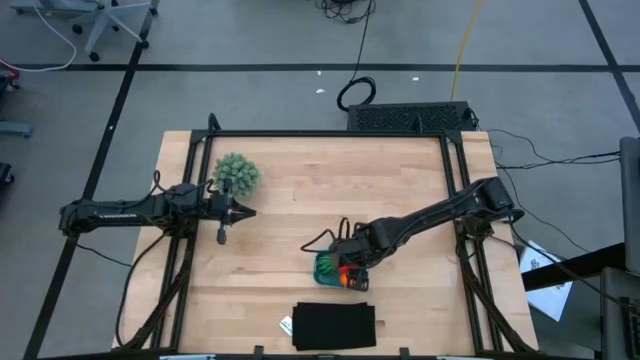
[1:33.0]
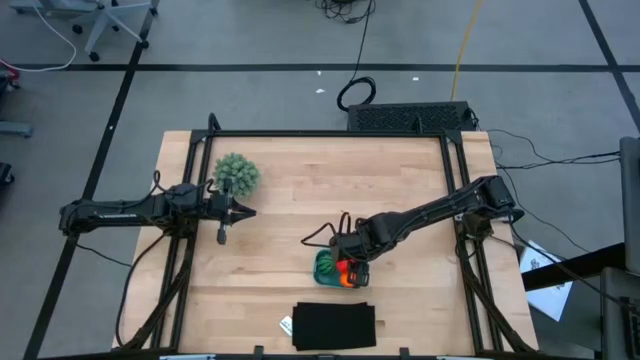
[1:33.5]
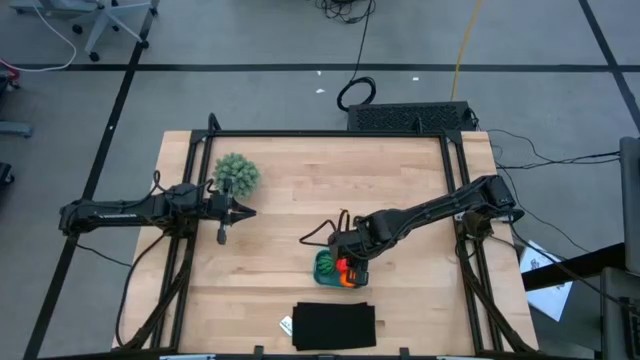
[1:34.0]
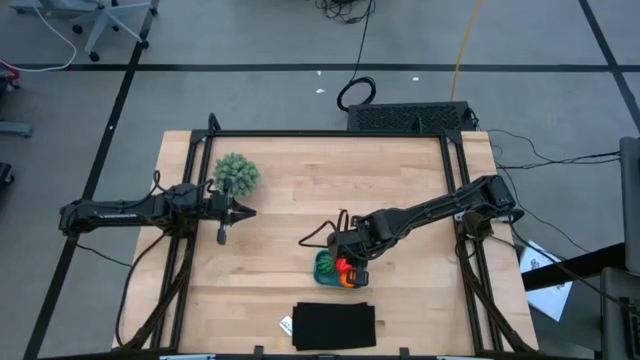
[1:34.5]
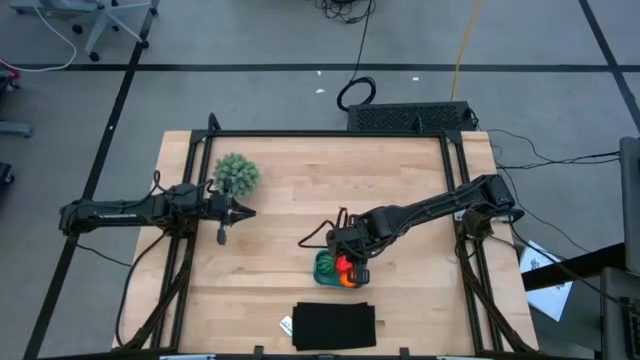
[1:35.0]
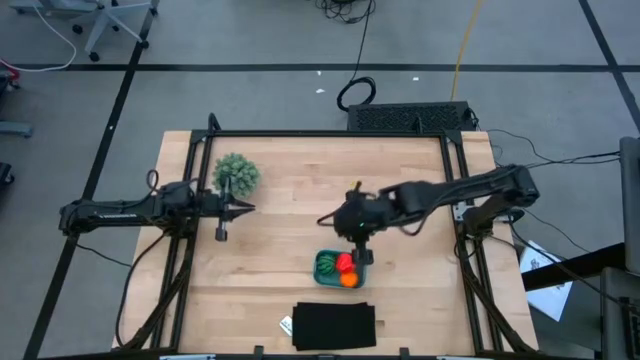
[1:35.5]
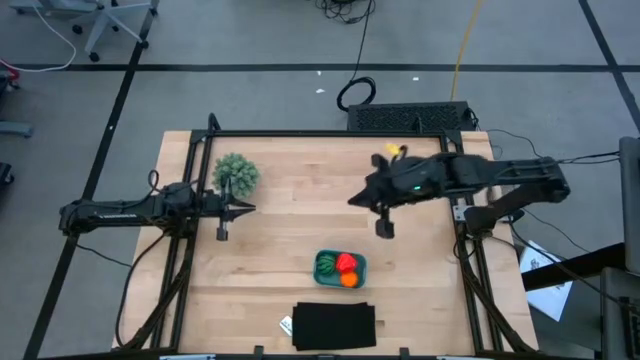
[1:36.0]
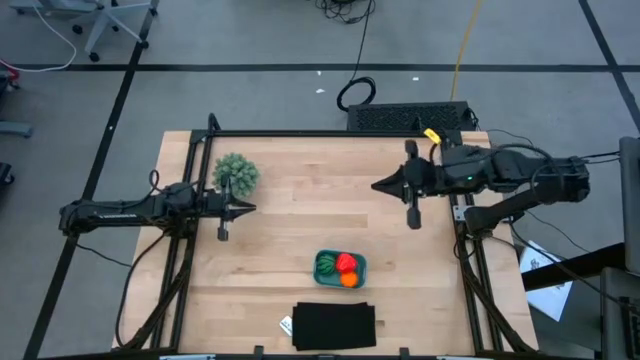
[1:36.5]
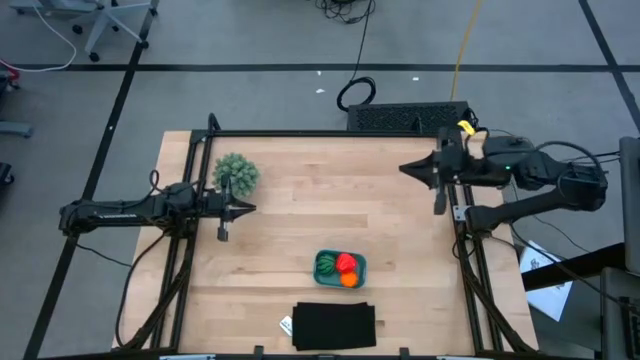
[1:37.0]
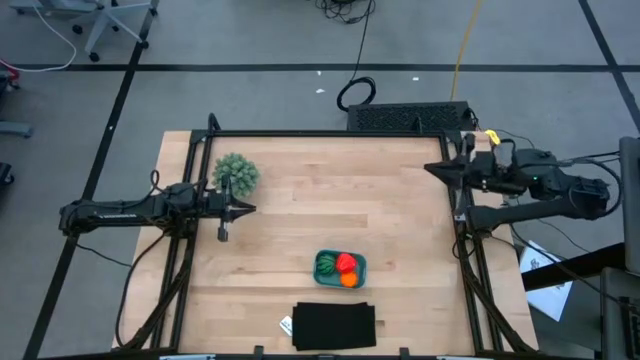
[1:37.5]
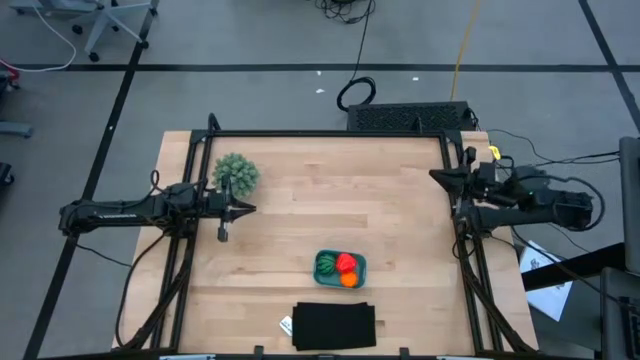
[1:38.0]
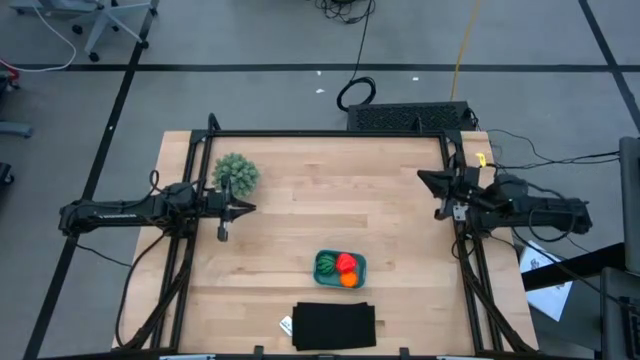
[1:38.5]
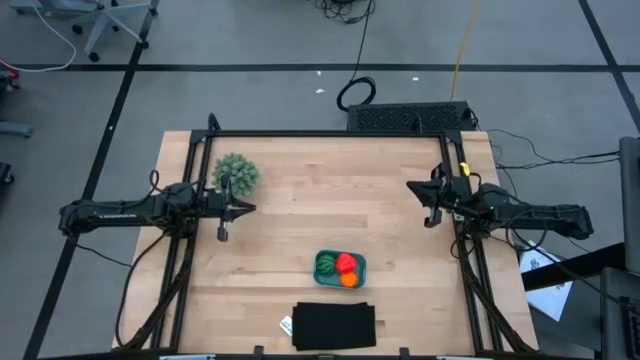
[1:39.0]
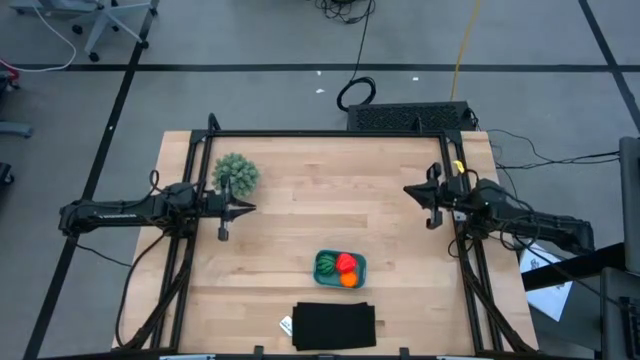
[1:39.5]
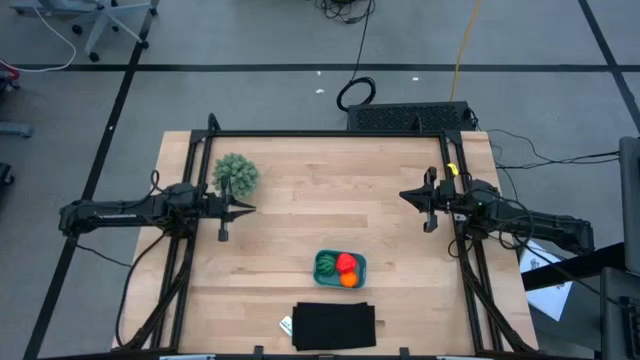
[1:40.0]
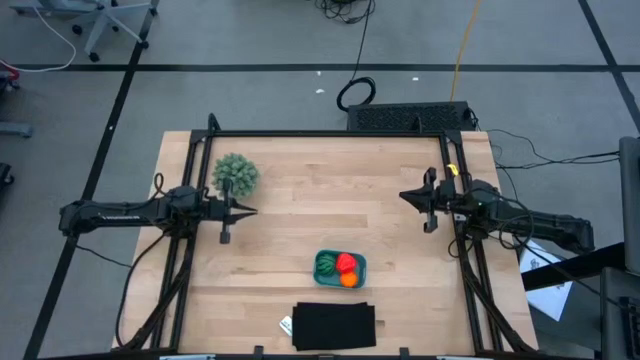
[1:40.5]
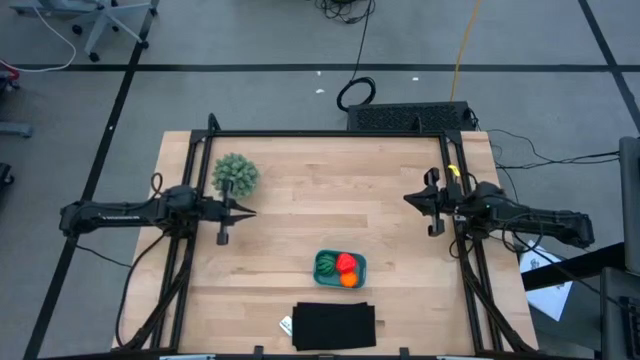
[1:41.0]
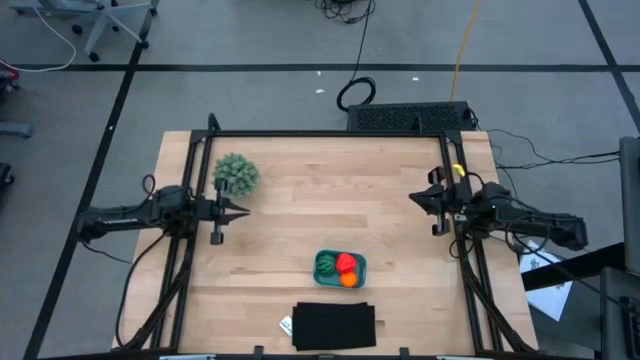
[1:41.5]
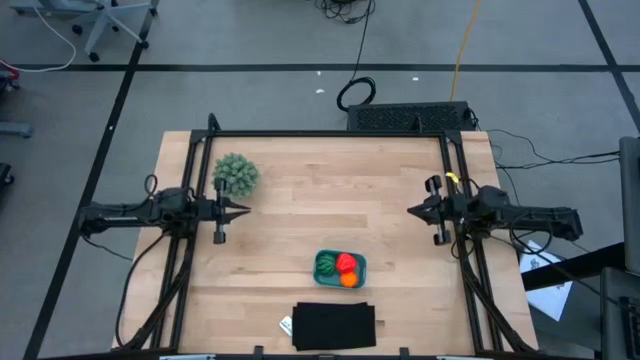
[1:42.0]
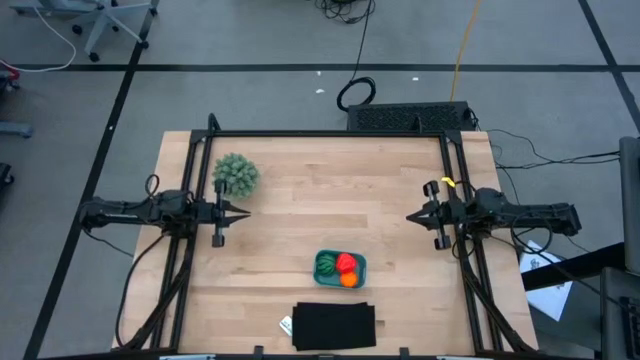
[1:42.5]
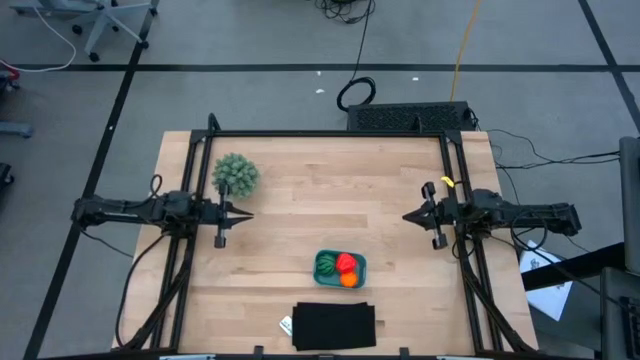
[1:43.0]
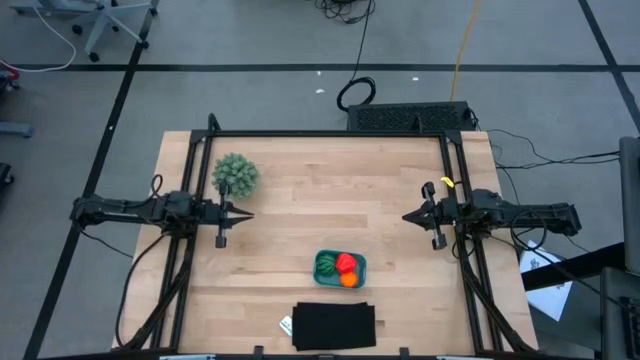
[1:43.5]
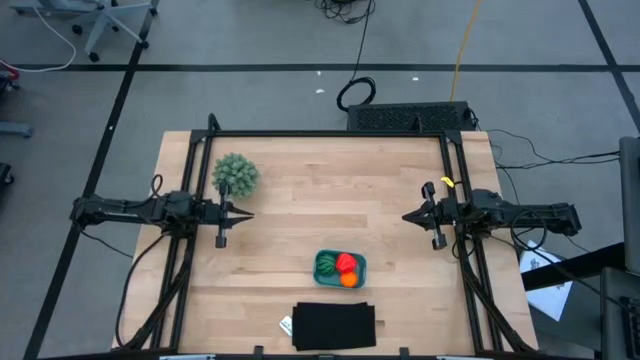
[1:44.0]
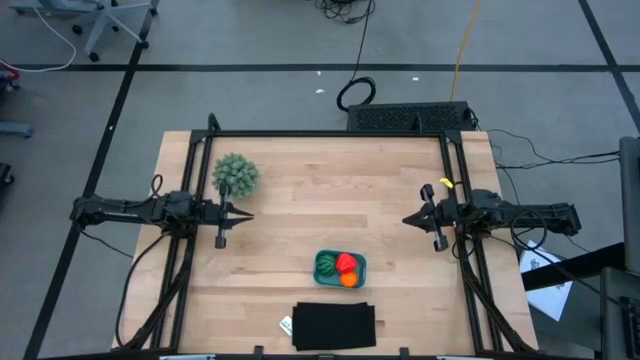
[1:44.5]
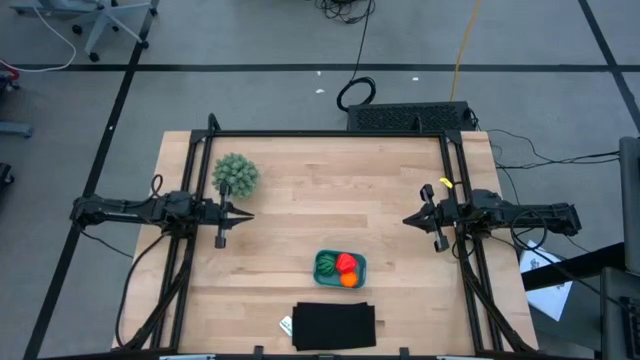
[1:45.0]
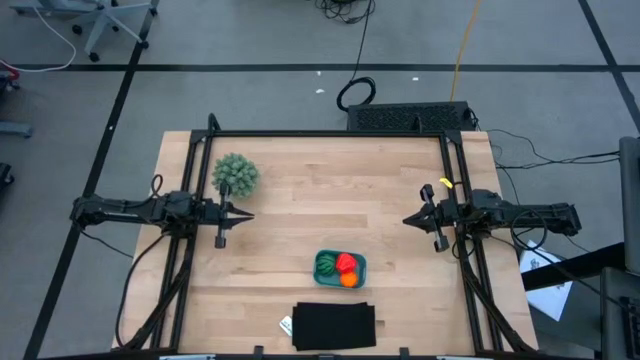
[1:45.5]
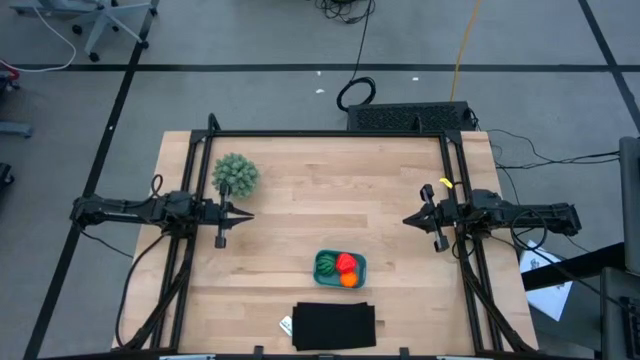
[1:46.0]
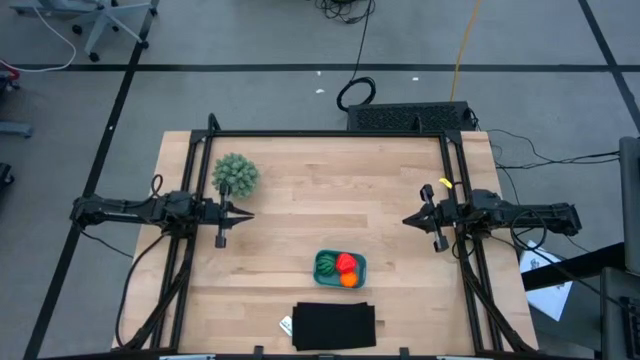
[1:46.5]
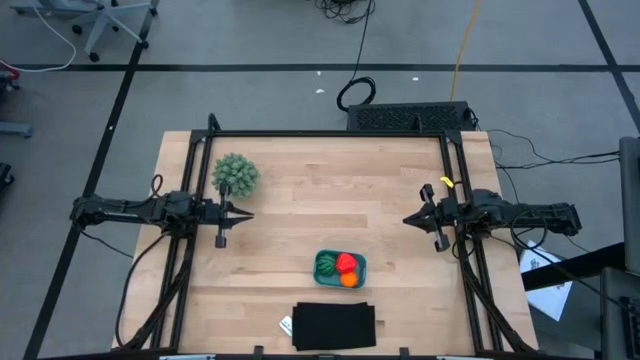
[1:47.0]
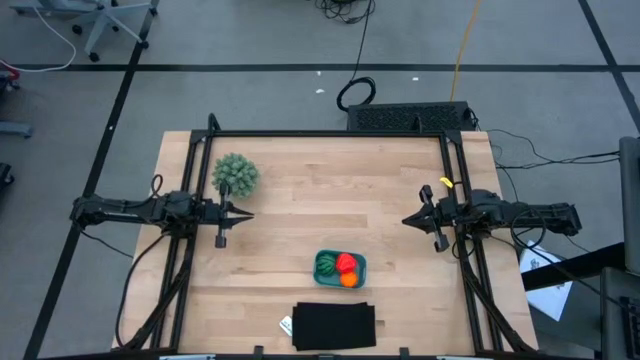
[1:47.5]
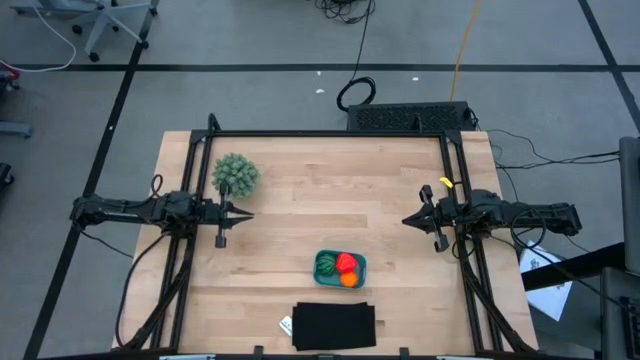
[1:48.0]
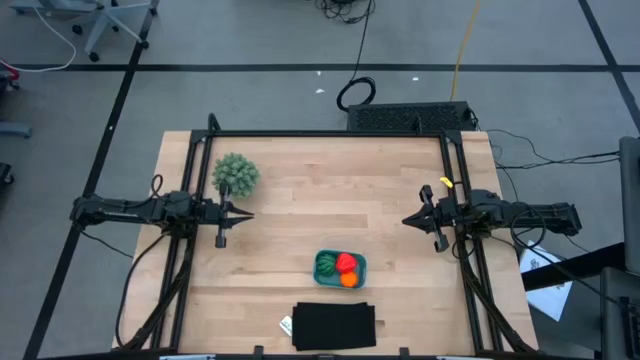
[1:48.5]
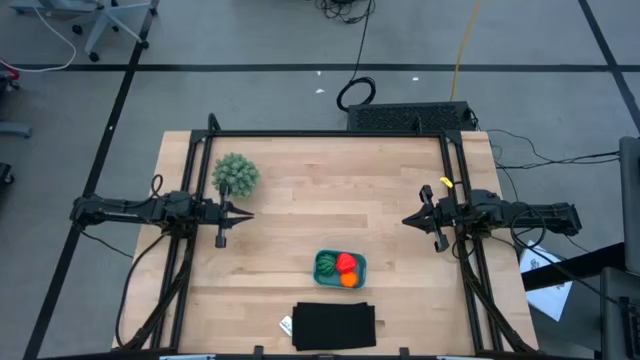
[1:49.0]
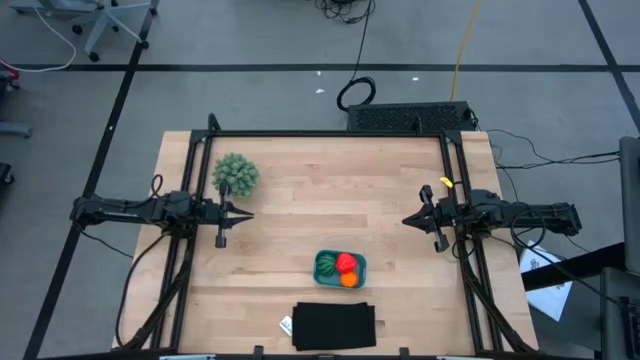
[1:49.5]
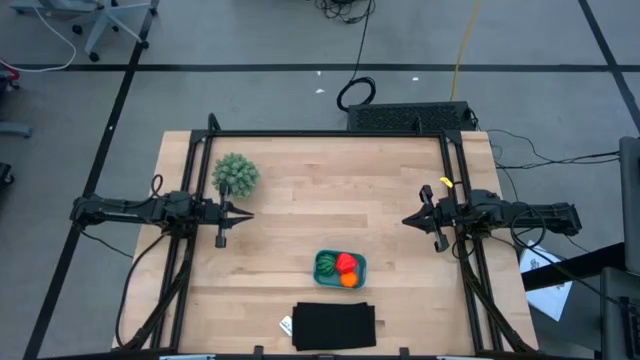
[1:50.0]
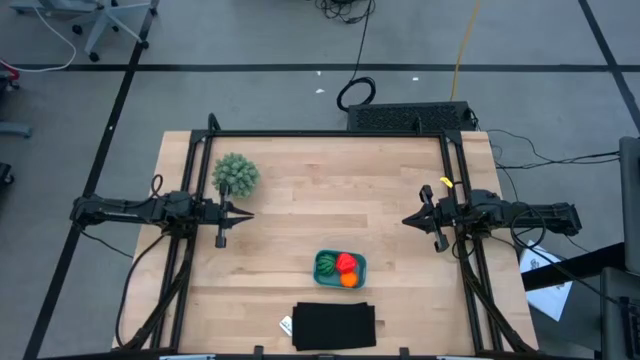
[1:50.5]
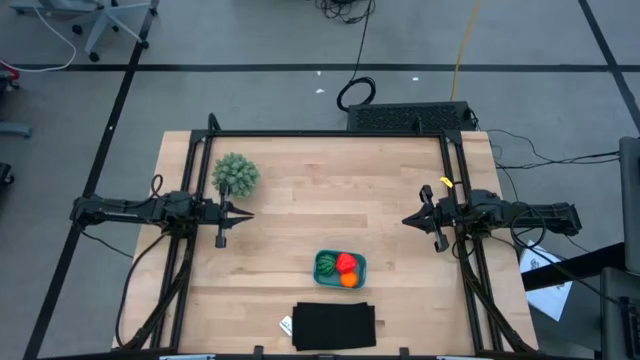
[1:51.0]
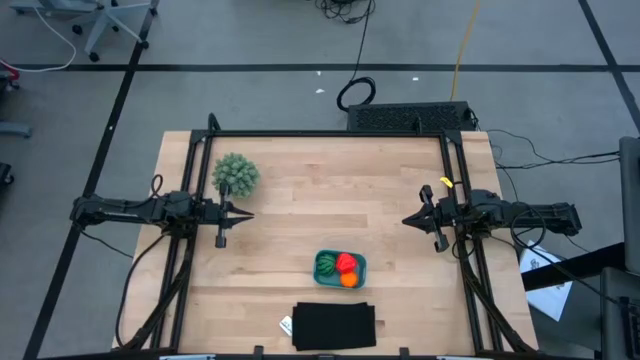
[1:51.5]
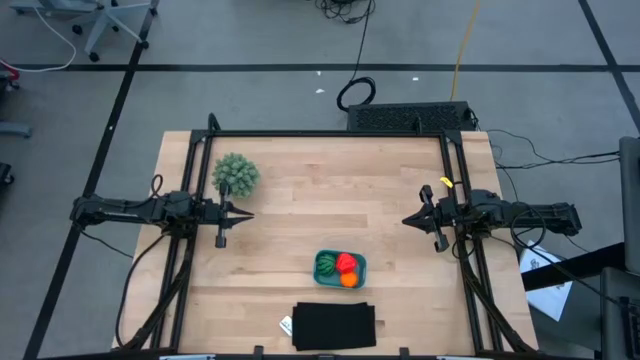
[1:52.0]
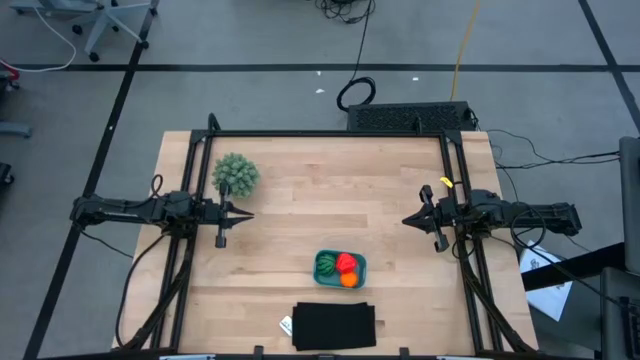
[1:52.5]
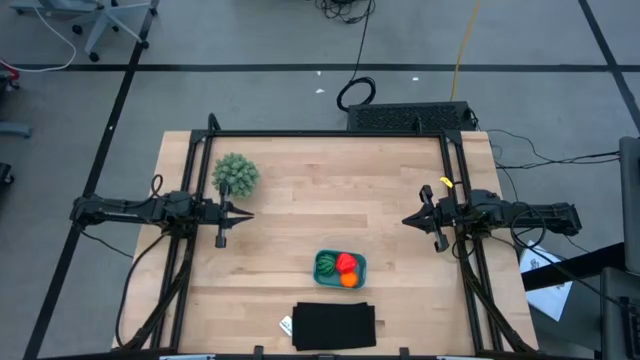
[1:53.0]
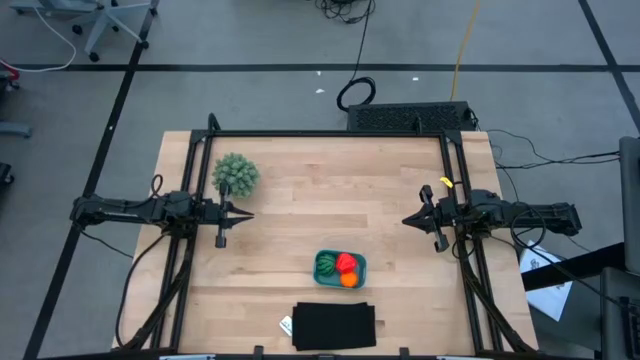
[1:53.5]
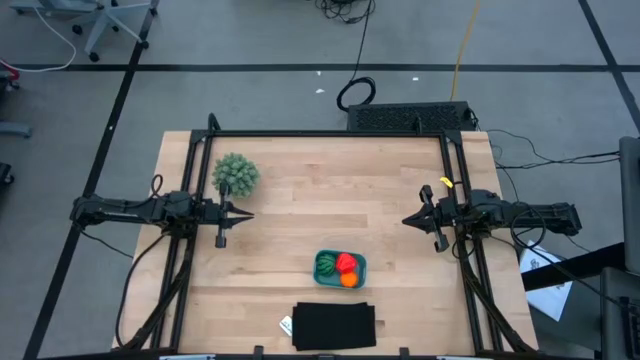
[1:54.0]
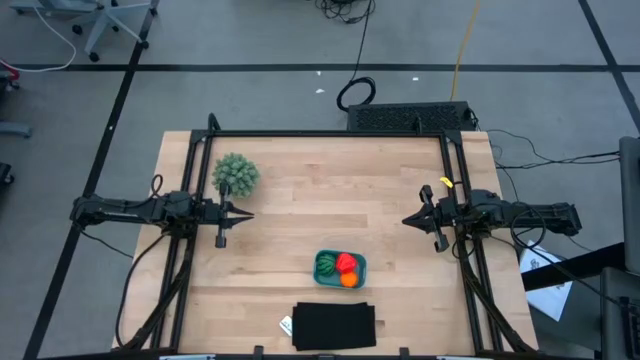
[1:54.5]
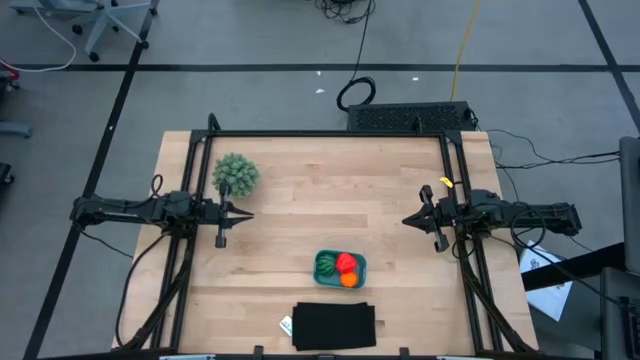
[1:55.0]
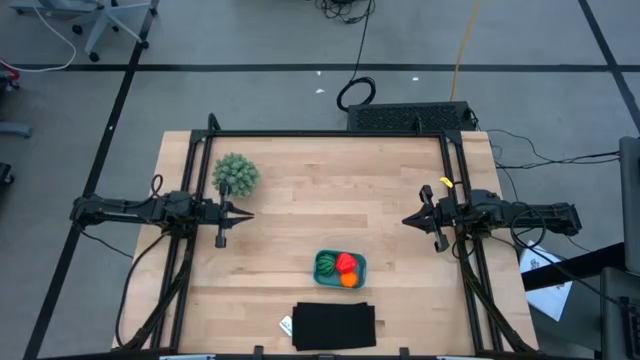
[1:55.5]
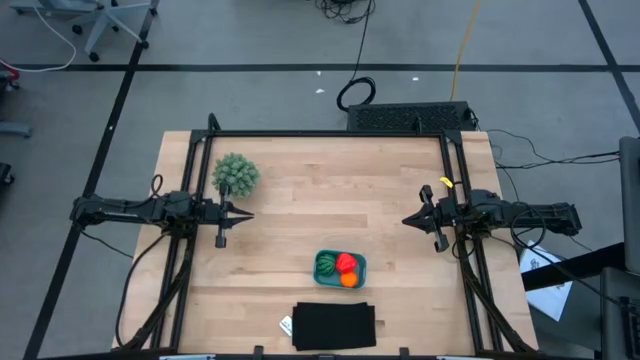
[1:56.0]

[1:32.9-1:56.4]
Task: Pick and placing Produce into tupperware
Return to Home Position
